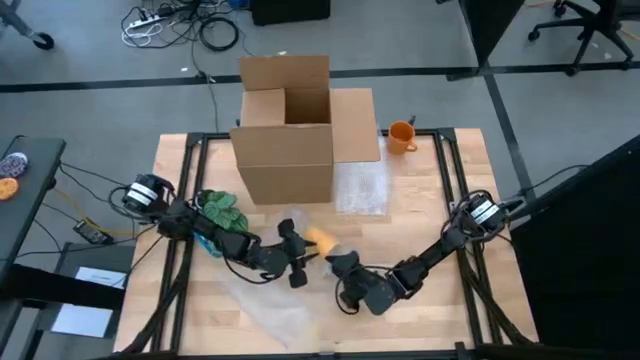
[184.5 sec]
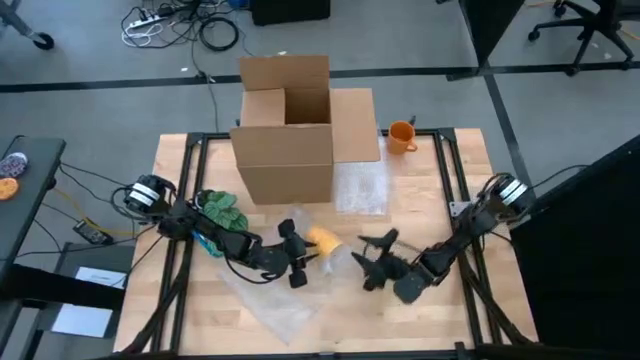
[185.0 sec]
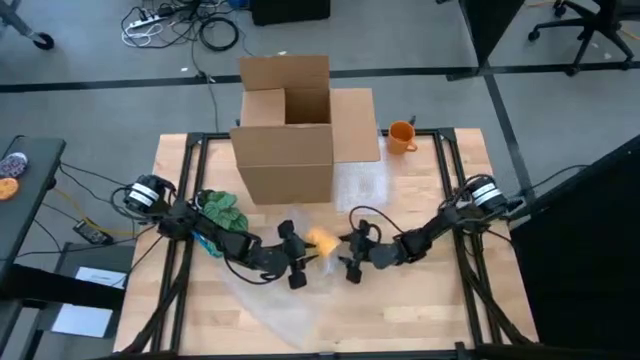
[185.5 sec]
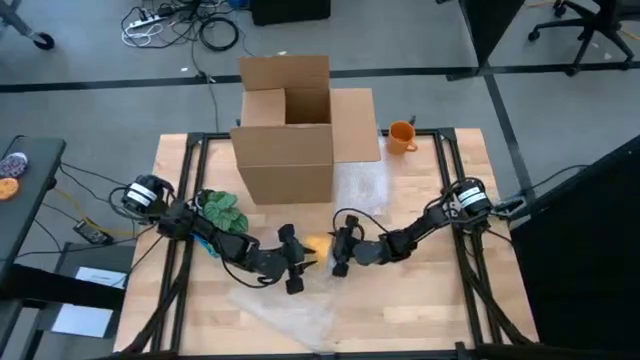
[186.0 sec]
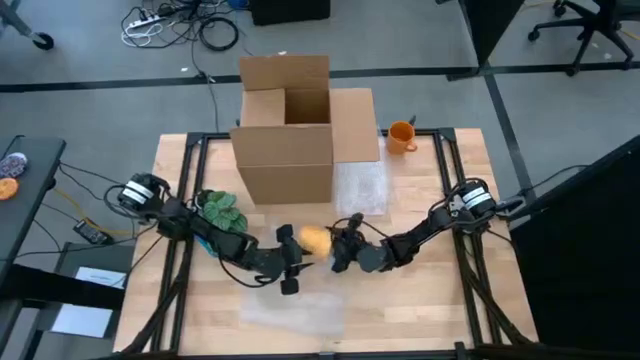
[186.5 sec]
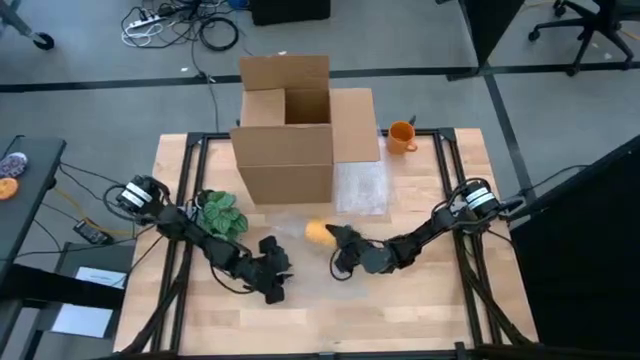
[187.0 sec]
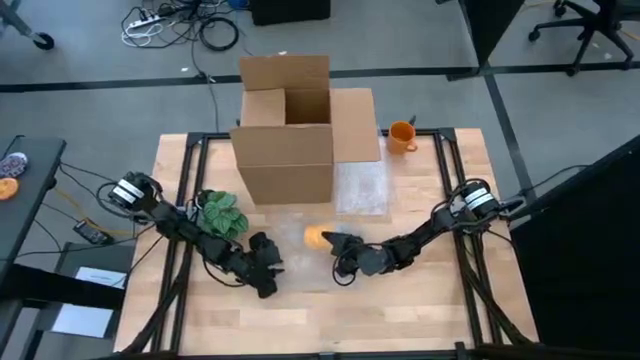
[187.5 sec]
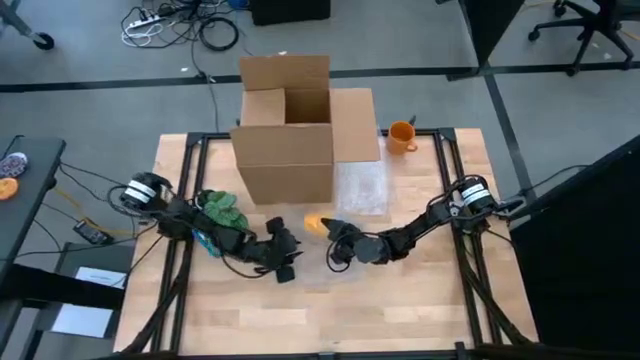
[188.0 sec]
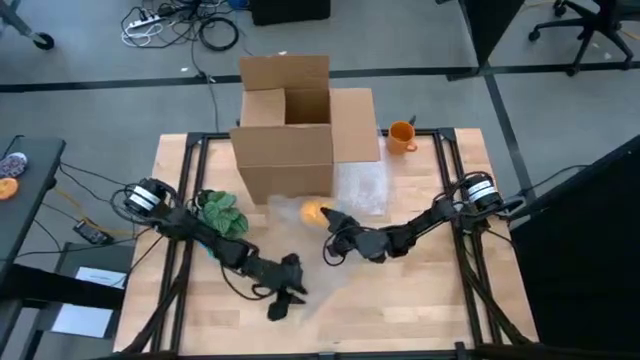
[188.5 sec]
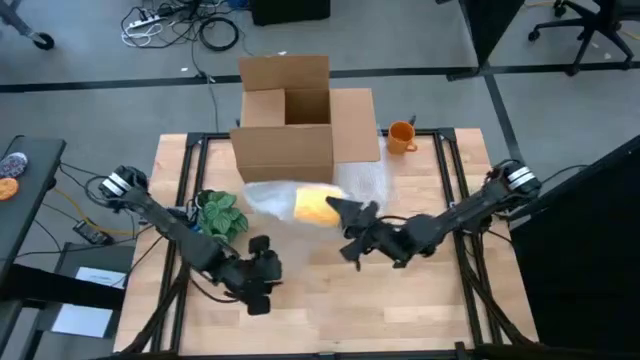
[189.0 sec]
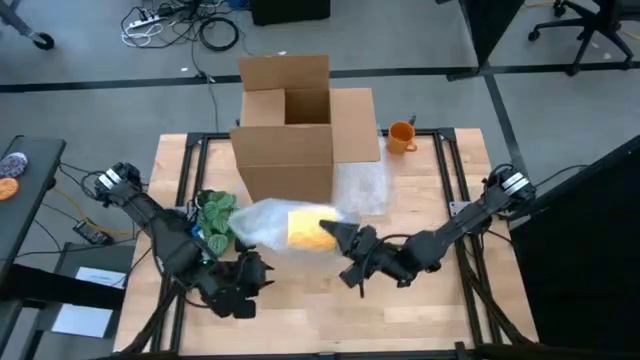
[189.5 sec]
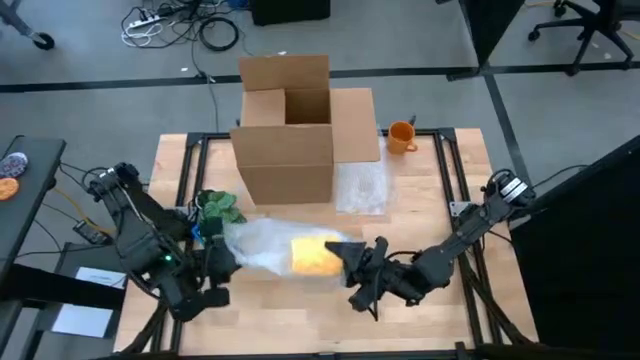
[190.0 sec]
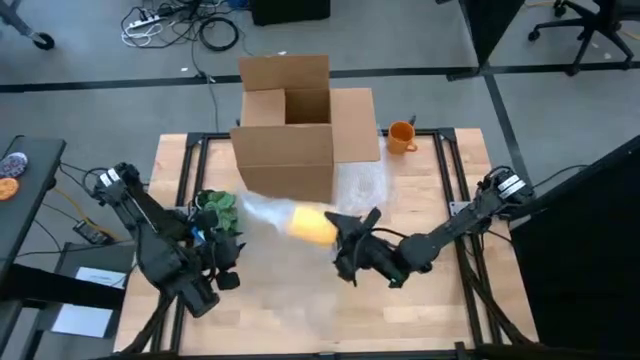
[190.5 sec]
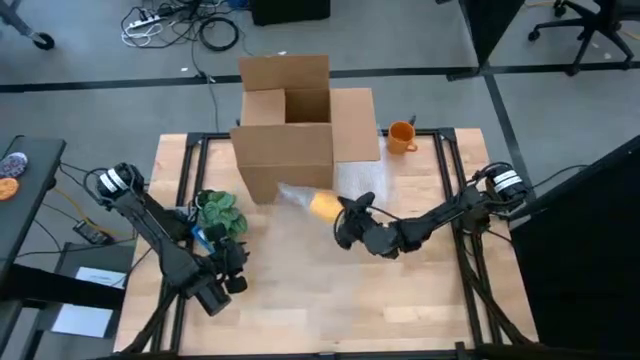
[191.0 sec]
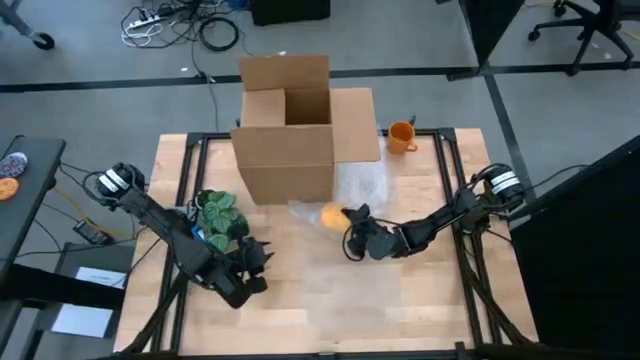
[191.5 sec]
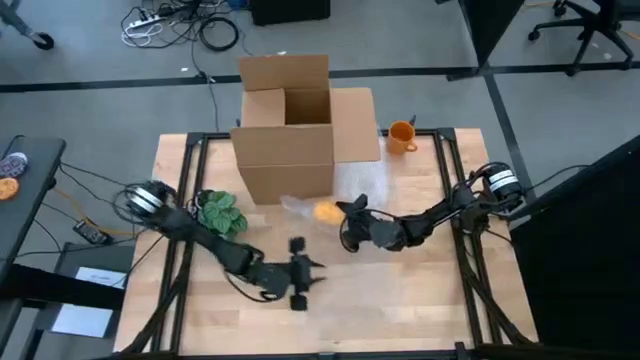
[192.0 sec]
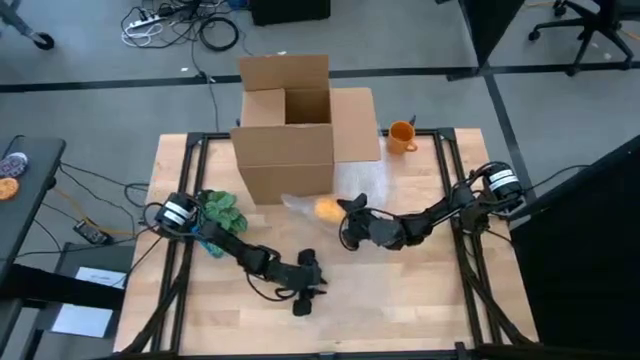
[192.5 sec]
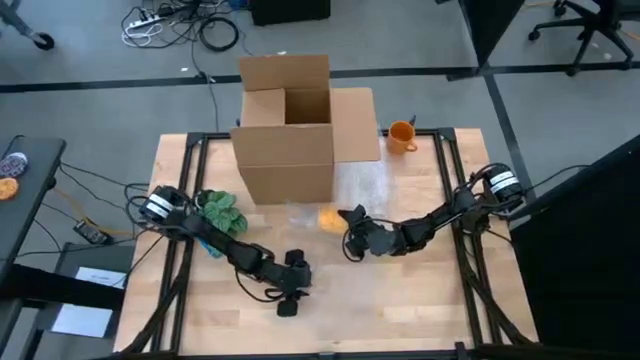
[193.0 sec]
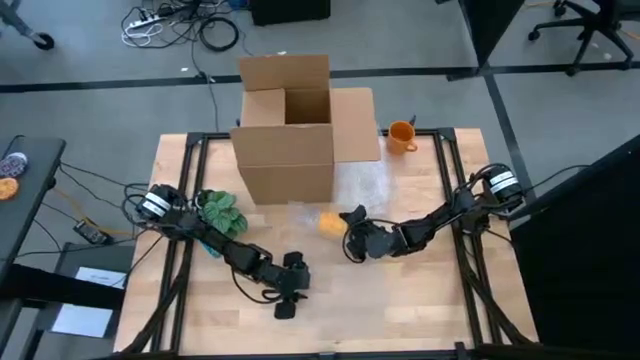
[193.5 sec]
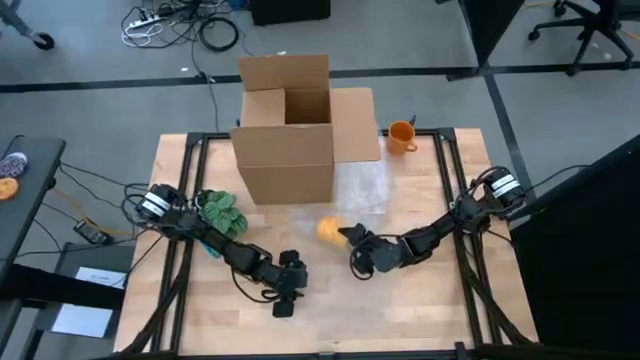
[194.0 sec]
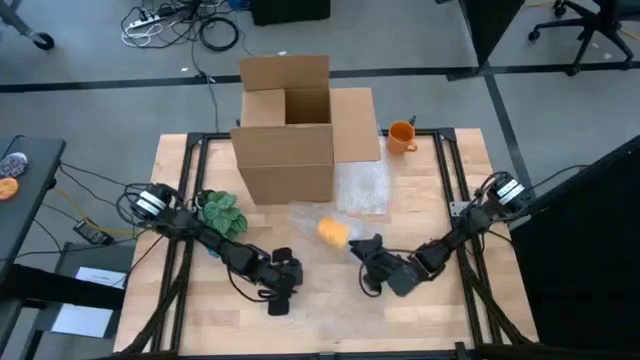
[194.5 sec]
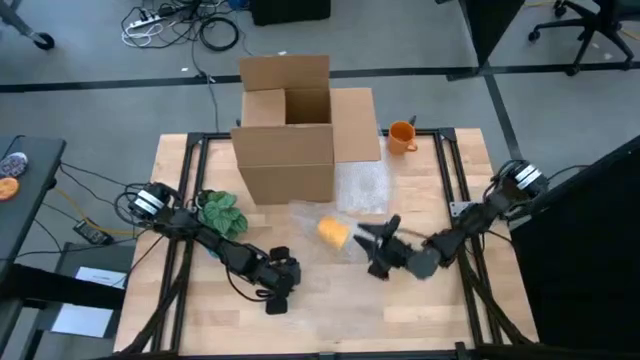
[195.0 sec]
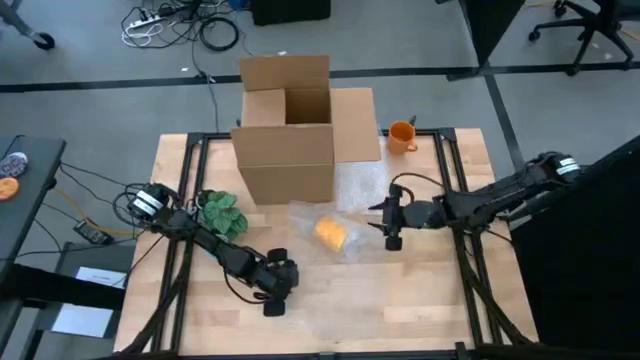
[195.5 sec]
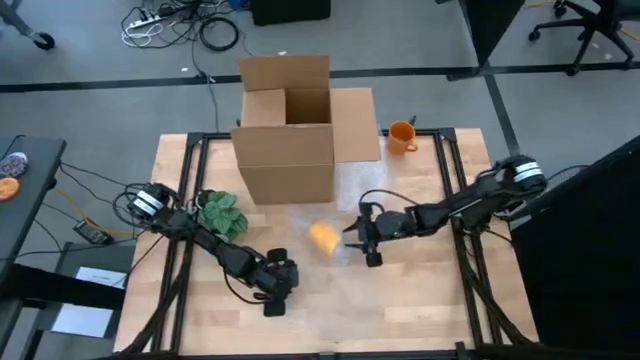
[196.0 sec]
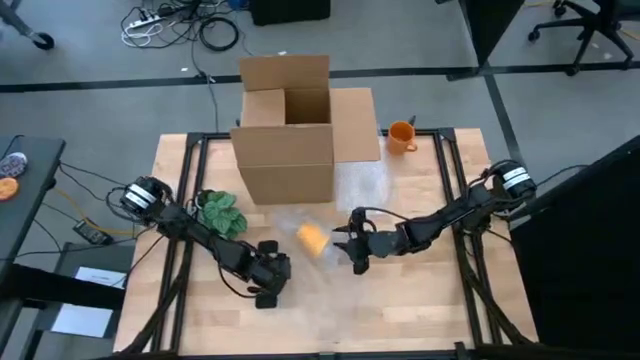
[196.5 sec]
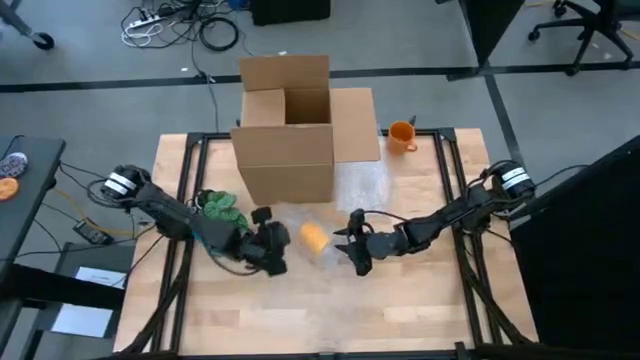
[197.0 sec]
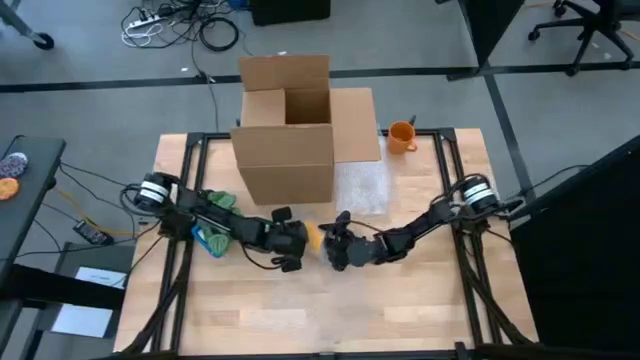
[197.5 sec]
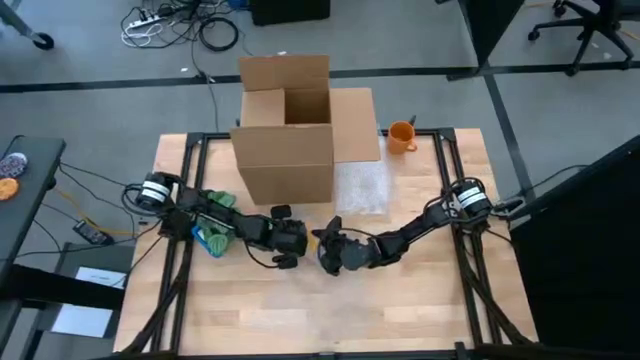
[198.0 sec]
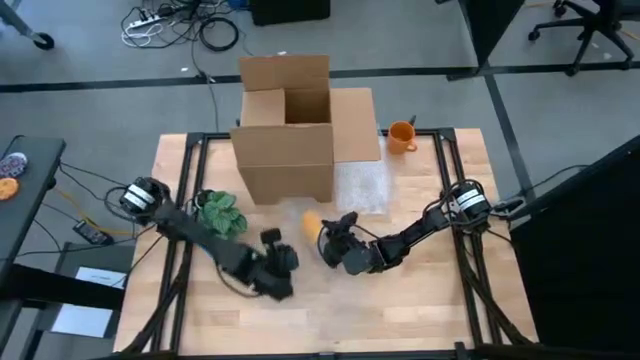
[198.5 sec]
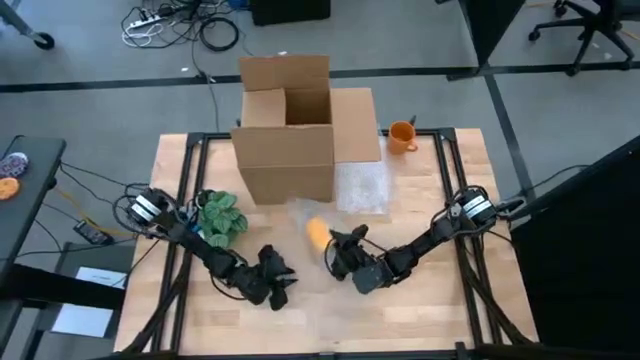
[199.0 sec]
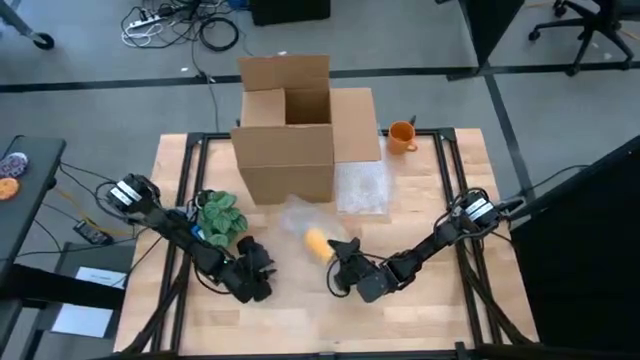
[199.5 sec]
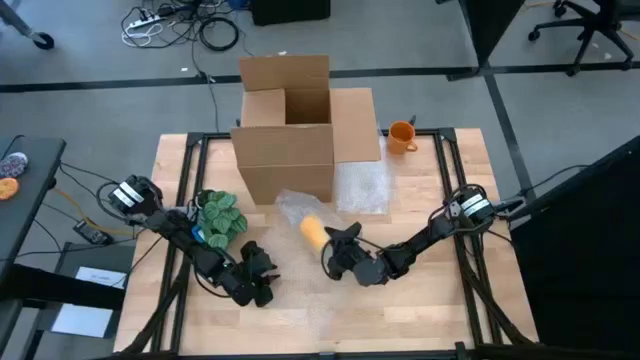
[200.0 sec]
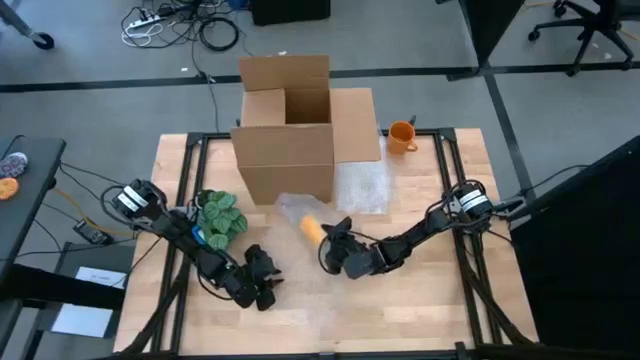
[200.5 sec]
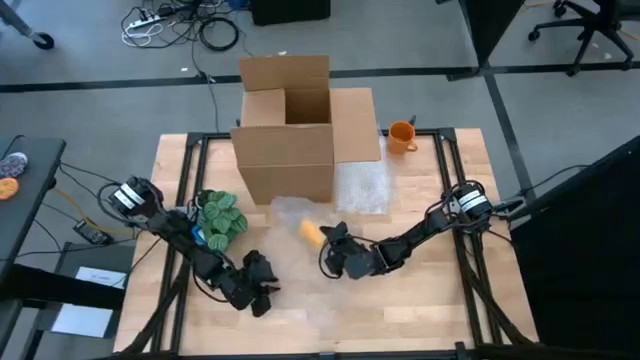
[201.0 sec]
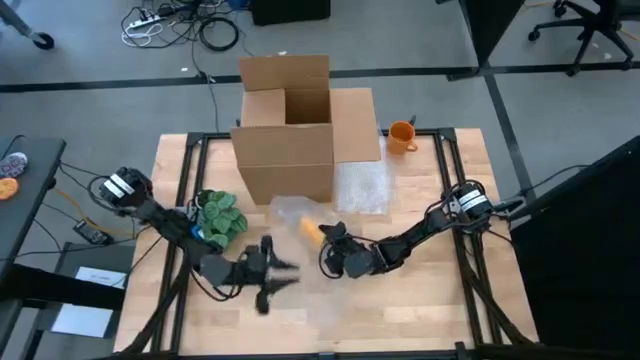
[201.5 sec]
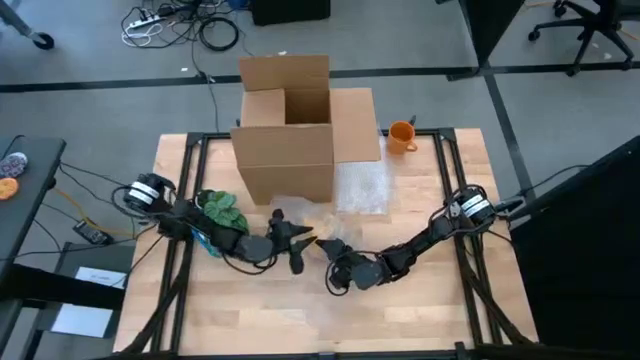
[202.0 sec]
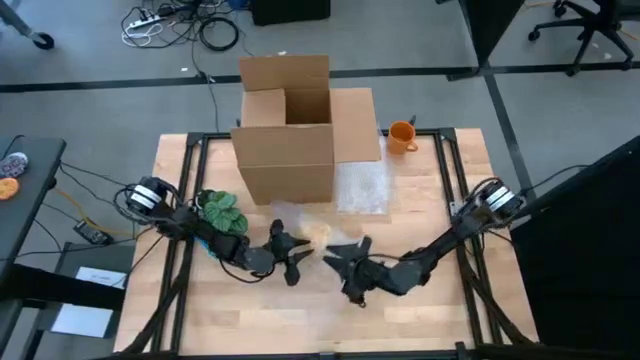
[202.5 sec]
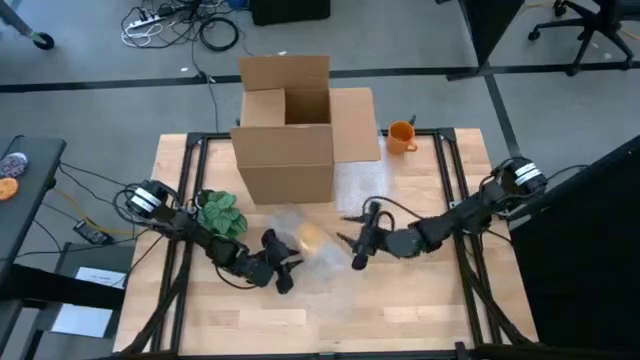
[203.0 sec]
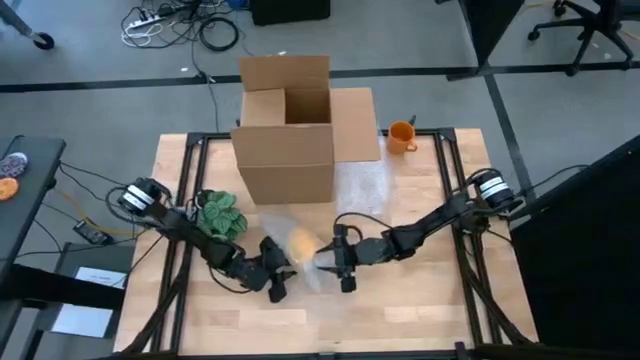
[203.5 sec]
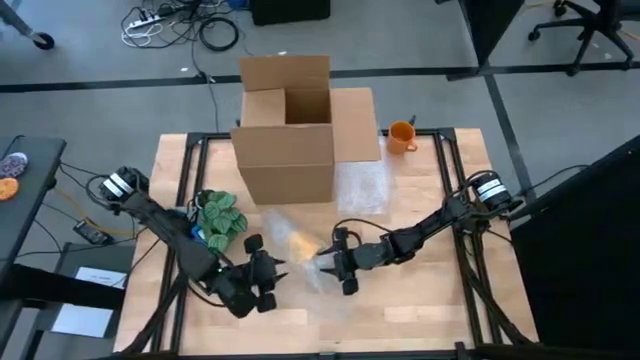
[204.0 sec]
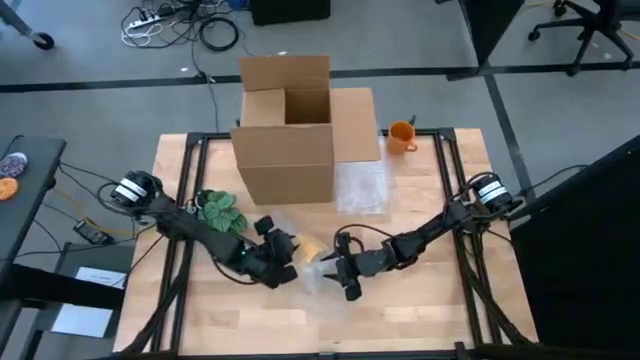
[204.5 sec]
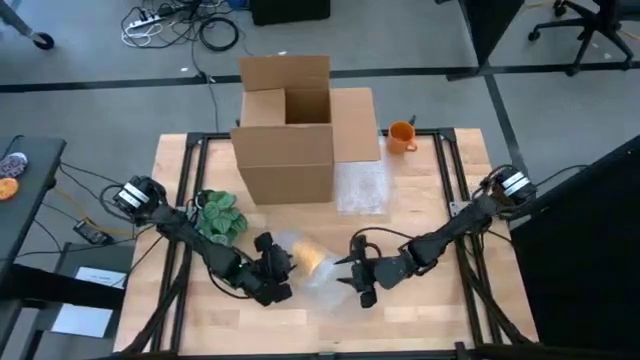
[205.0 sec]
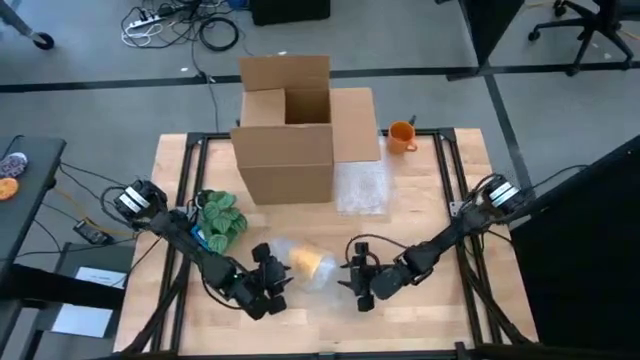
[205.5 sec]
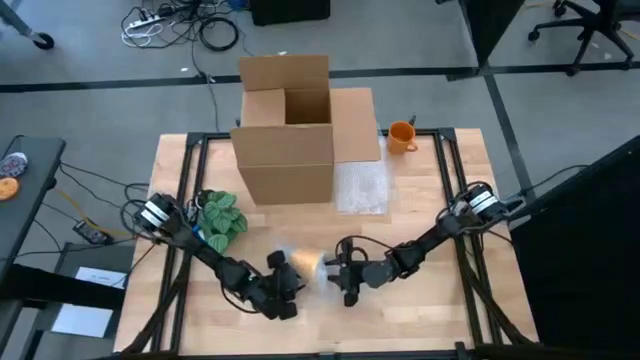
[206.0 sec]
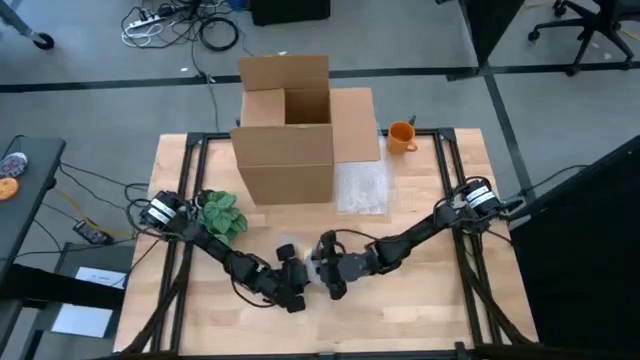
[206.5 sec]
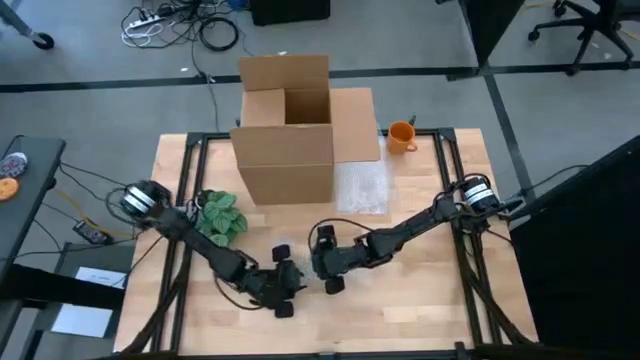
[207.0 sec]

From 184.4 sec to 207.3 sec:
Task: wrap mug
Wrap the yellow mug with the bubble wrap
